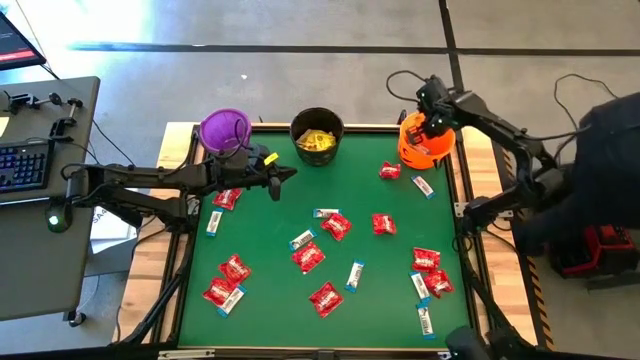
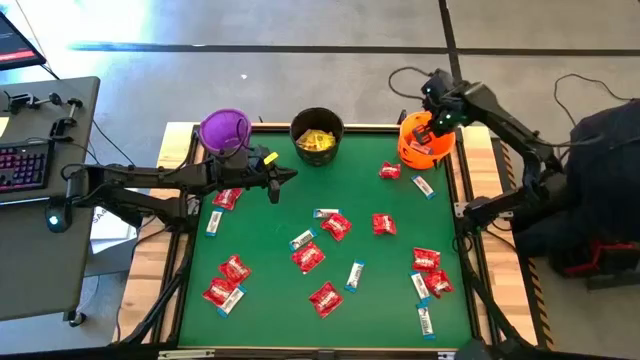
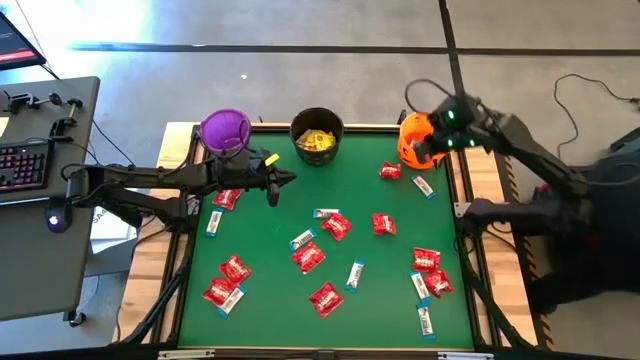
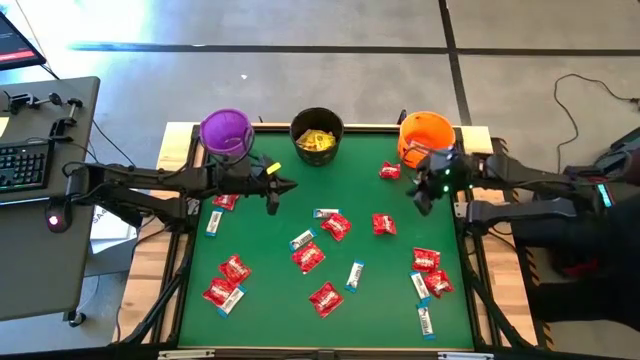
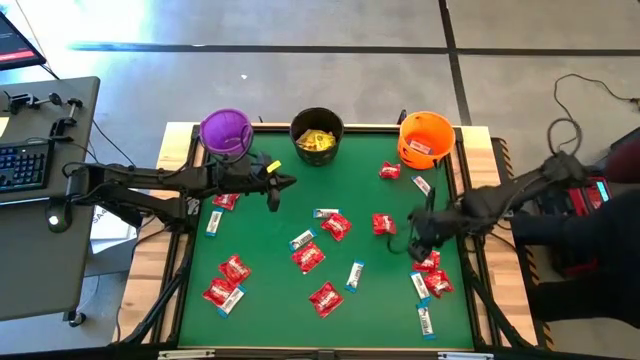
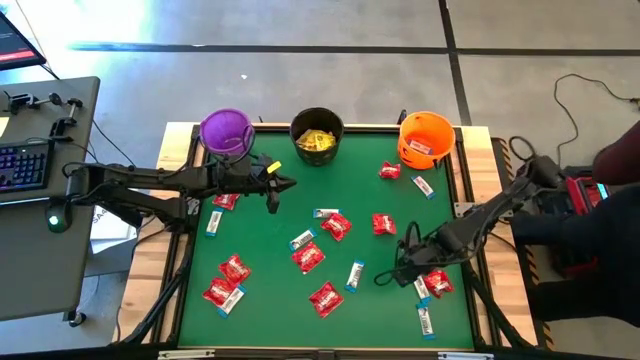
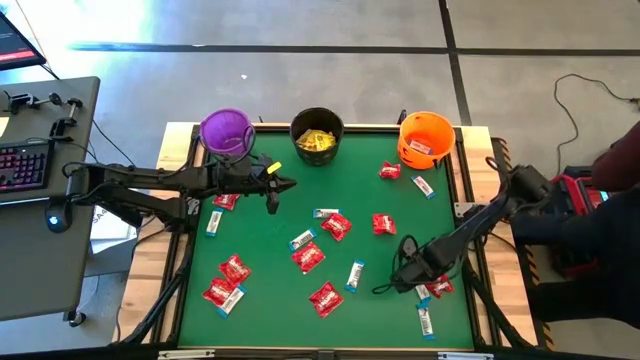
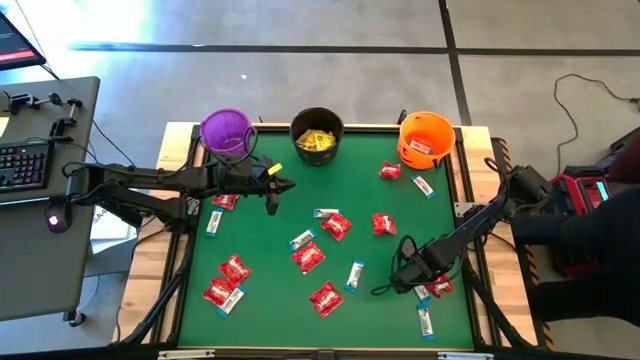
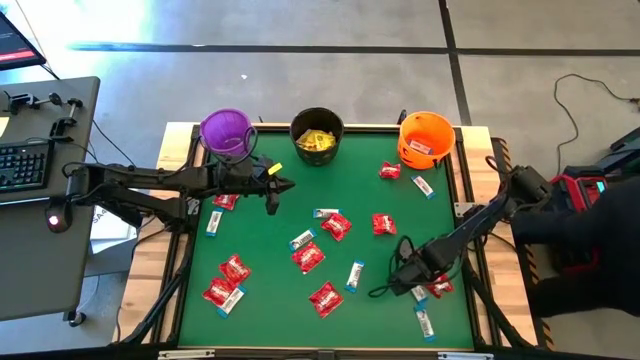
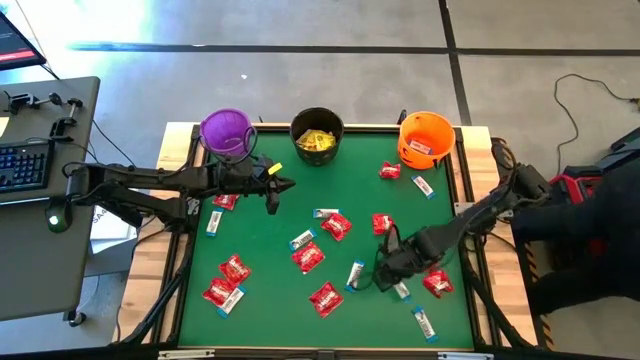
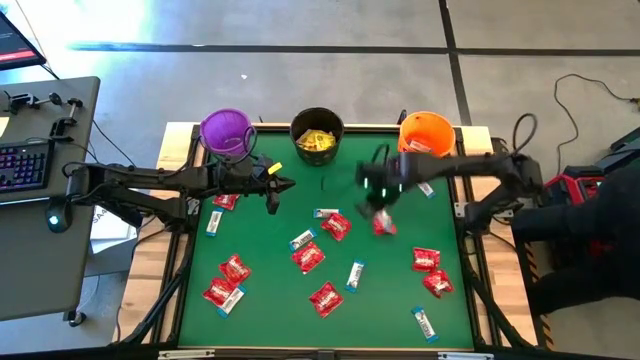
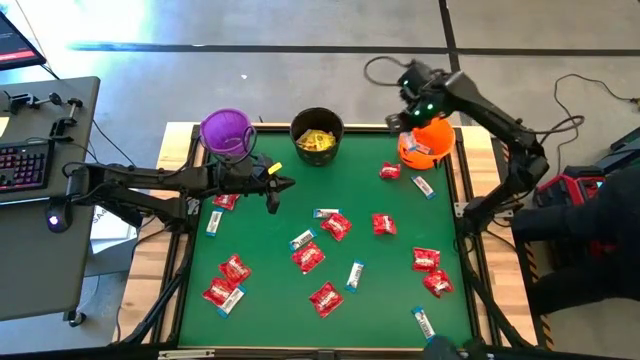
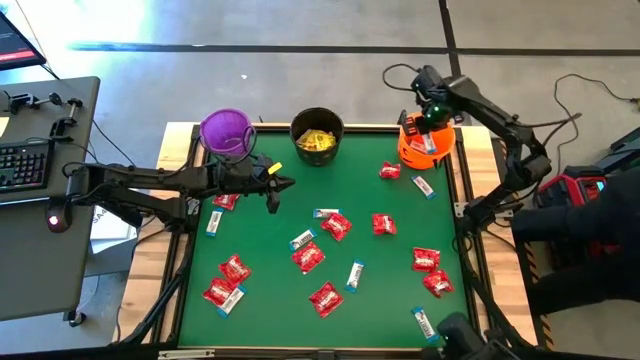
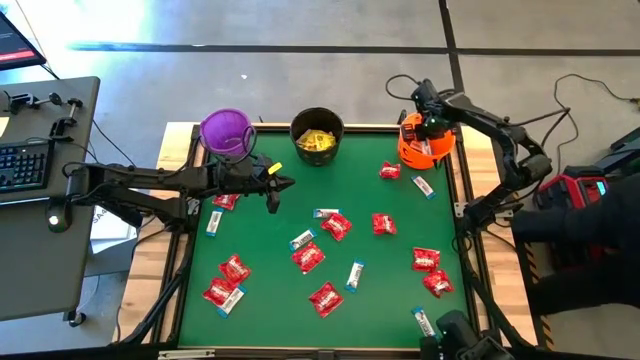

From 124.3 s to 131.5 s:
Task: Sort candy by brand, put in halloween buckets
Put the blue chocolate bar into the orange bucket

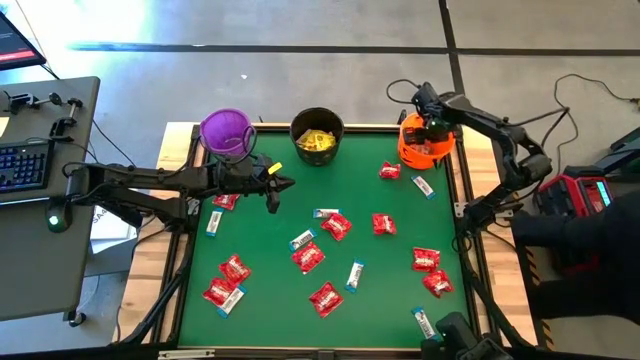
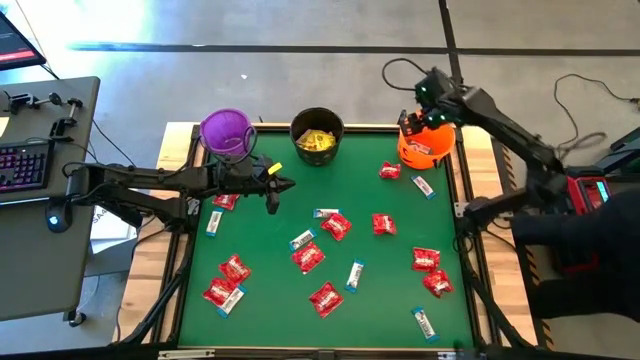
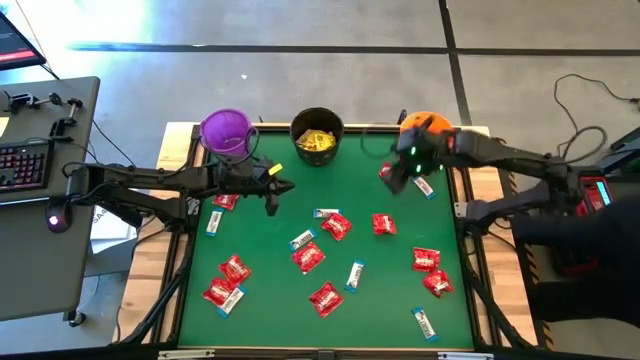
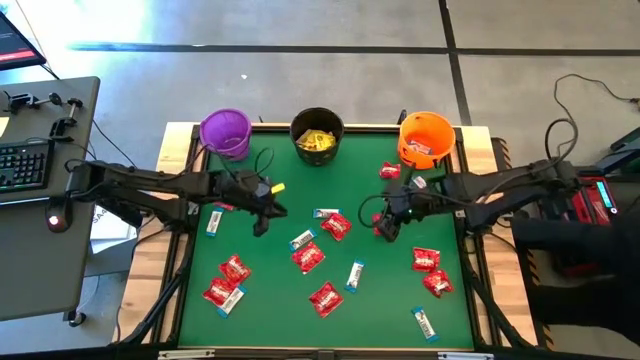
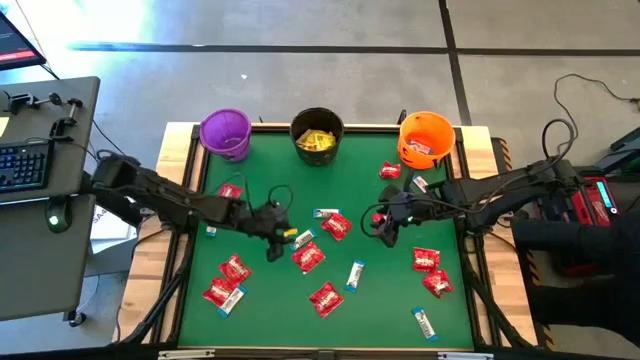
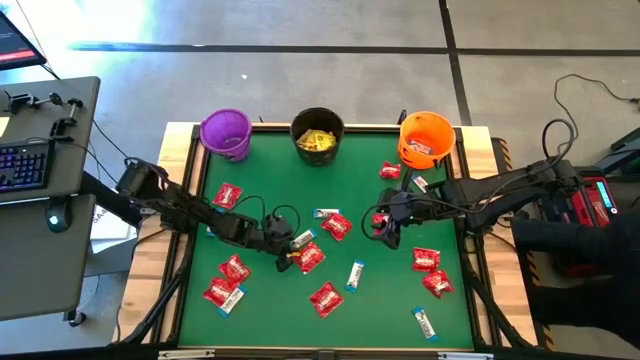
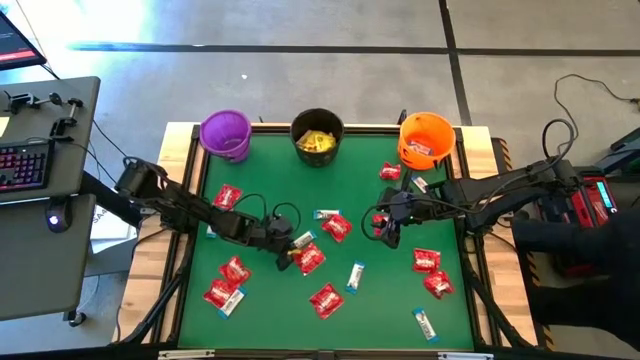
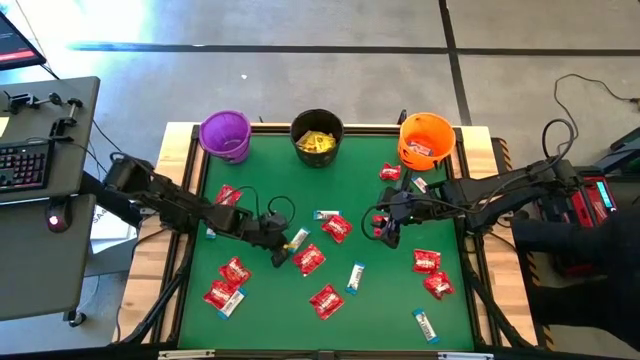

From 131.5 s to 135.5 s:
Put the blue chocolate bar into the orange bucket

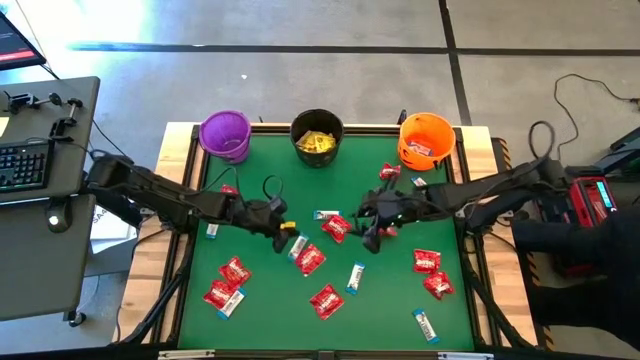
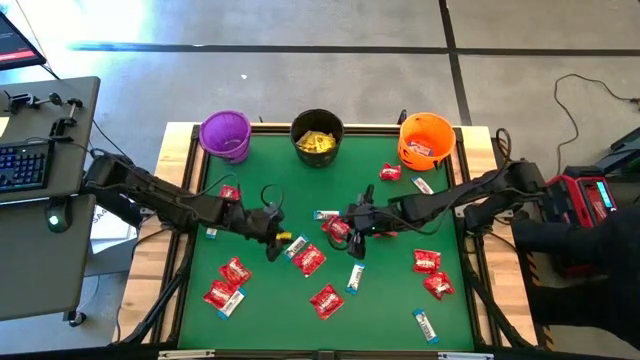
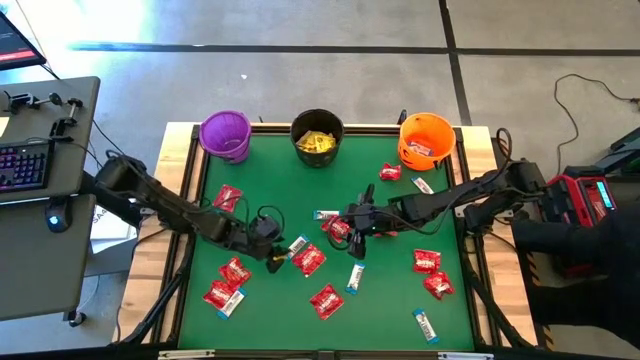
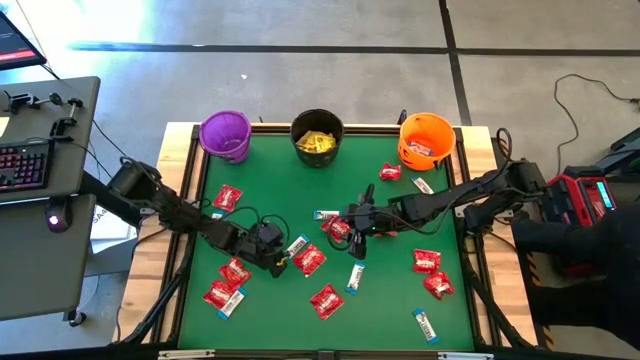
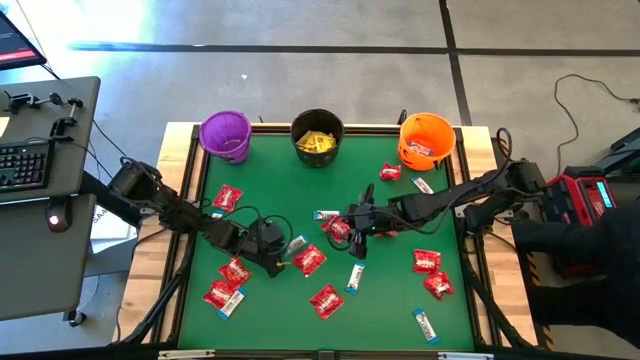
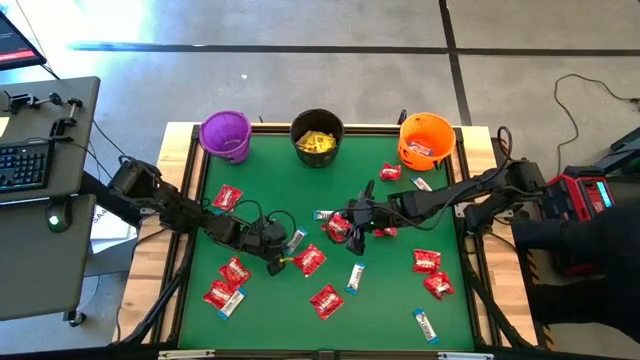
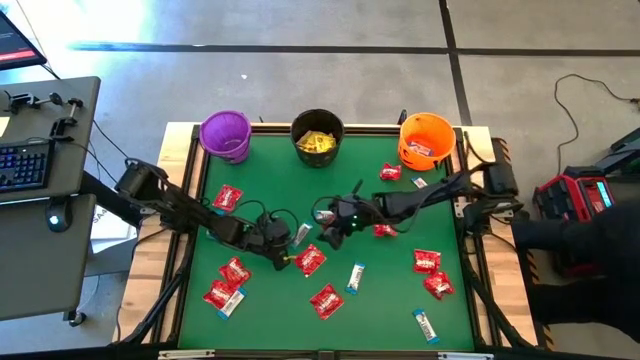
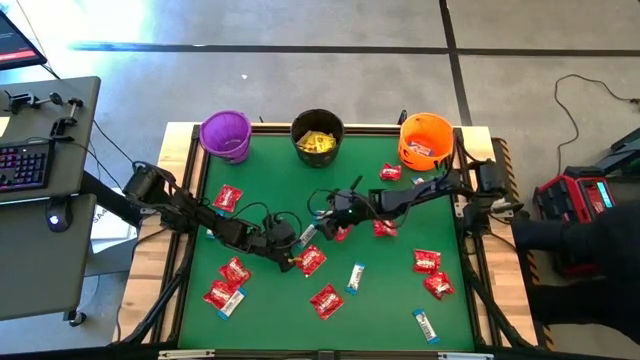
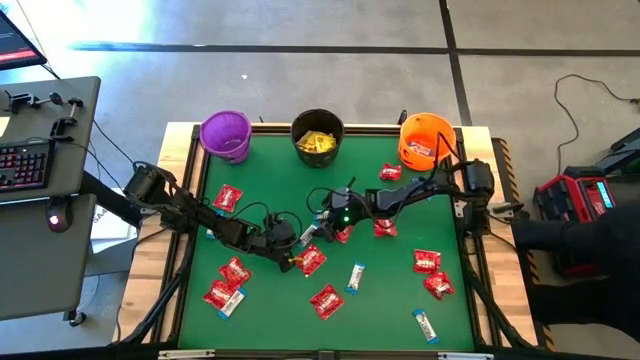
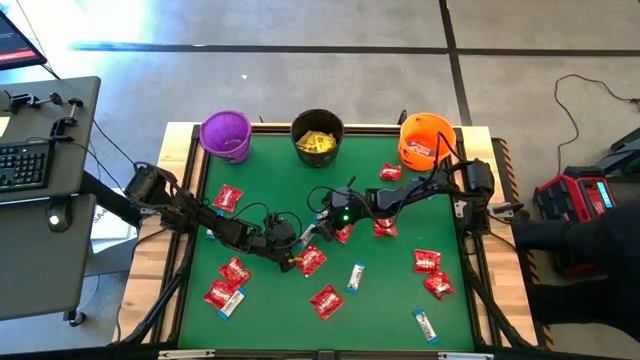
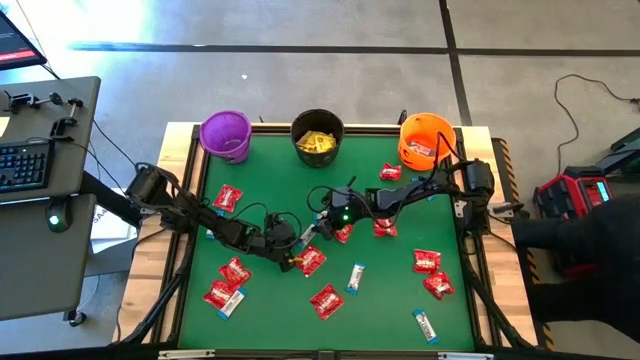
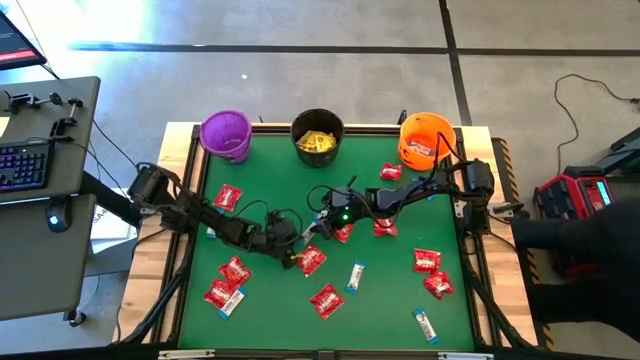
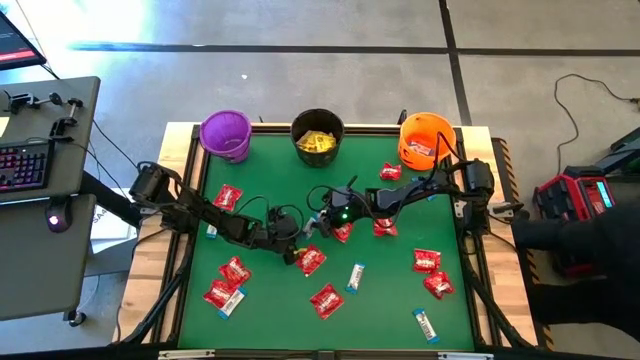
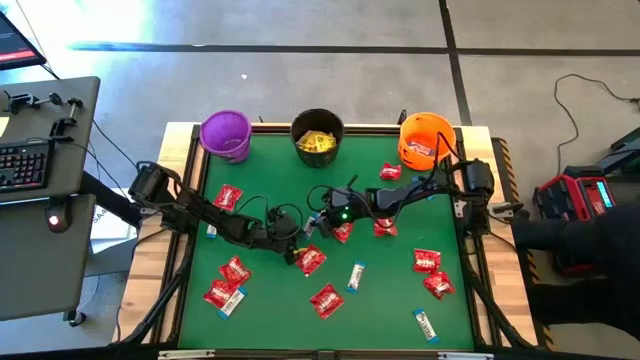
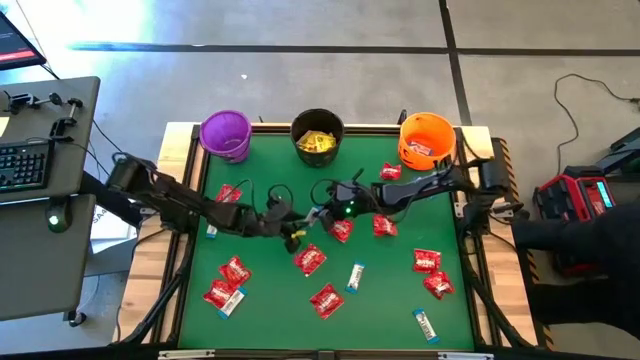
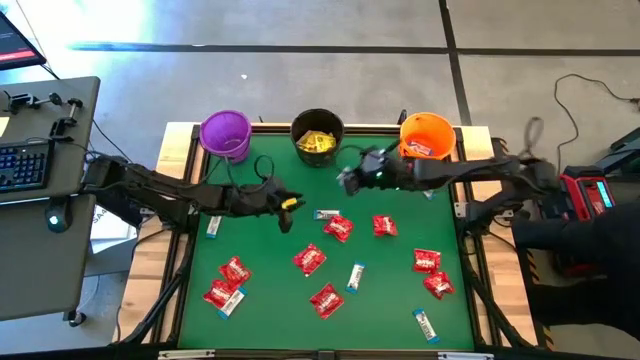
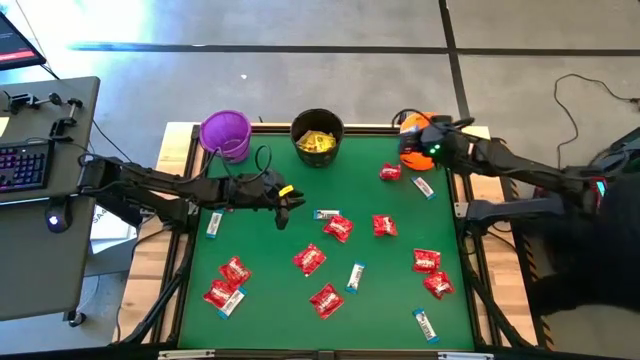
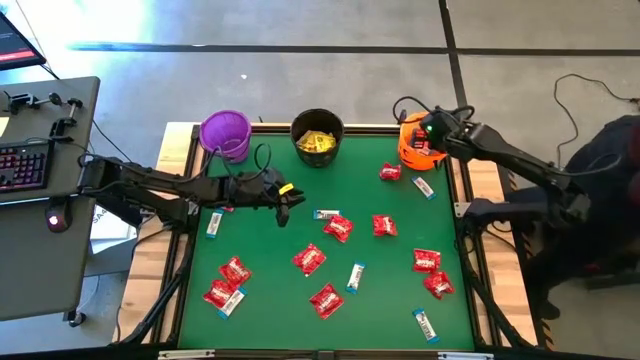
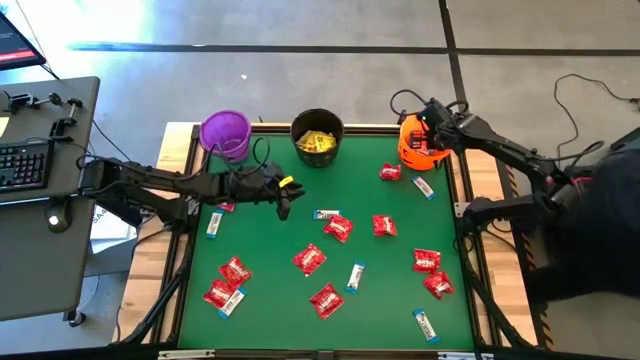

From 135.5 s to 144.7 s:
Put the blue chocolate bar into the orange bucket
